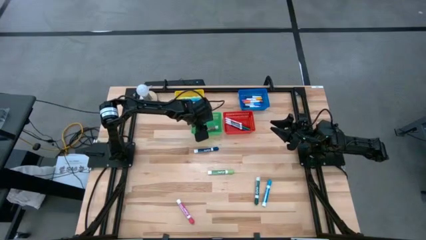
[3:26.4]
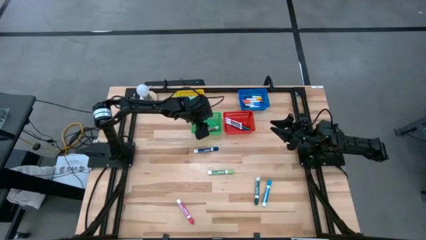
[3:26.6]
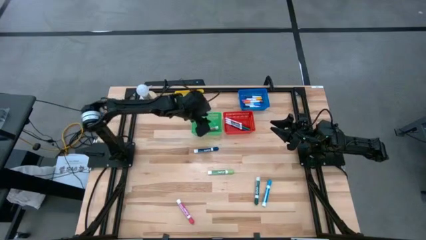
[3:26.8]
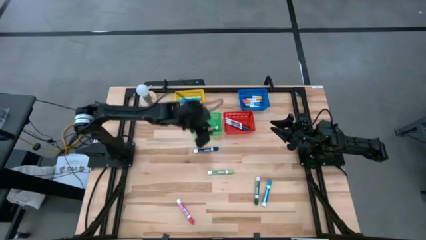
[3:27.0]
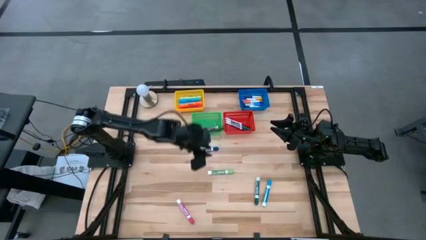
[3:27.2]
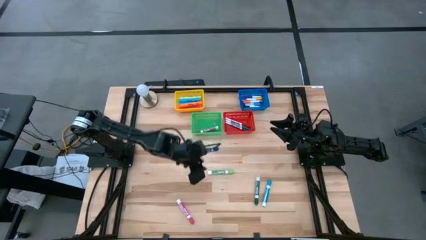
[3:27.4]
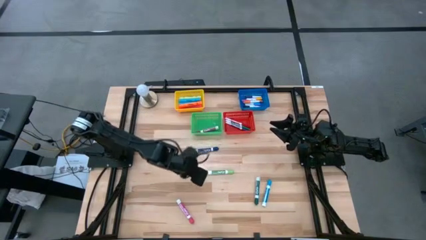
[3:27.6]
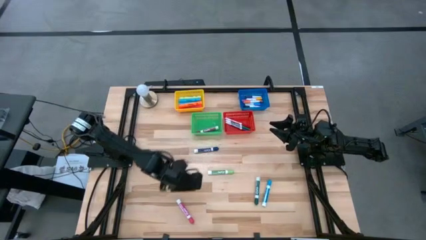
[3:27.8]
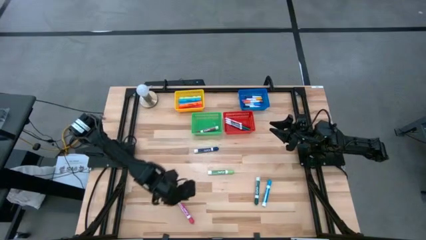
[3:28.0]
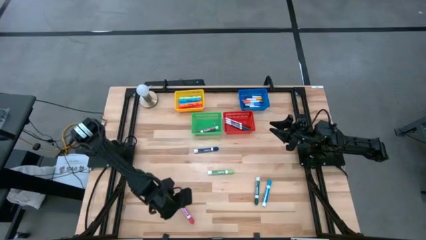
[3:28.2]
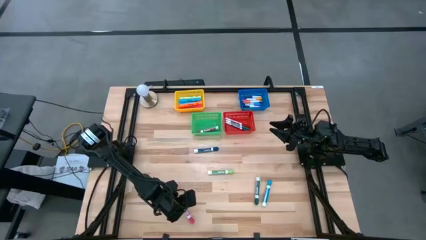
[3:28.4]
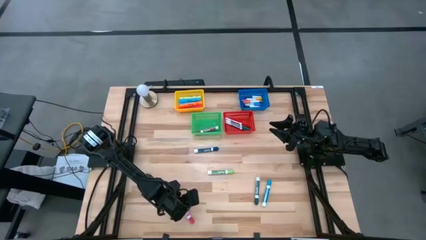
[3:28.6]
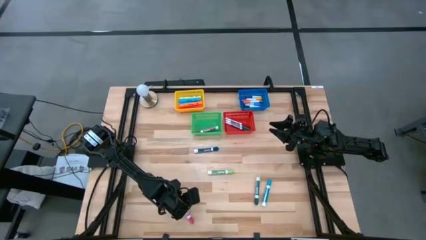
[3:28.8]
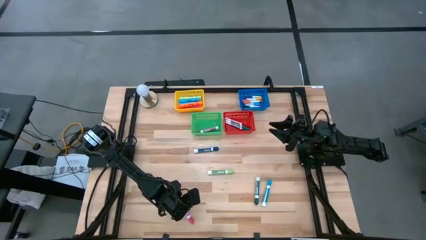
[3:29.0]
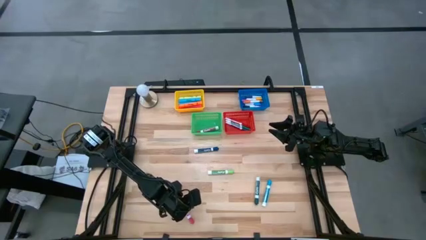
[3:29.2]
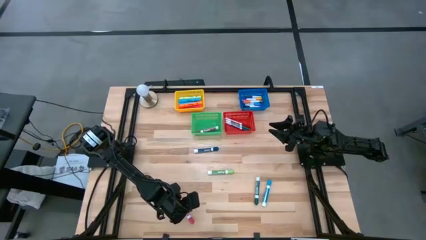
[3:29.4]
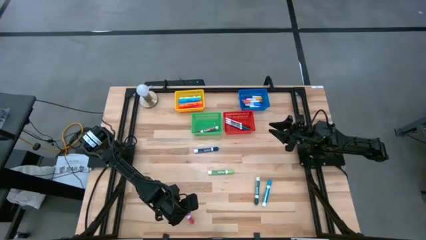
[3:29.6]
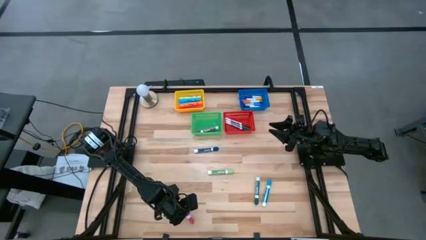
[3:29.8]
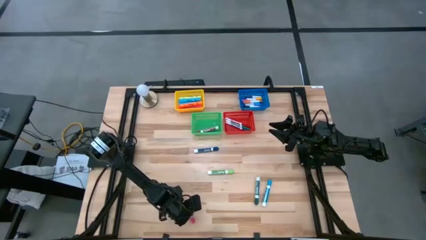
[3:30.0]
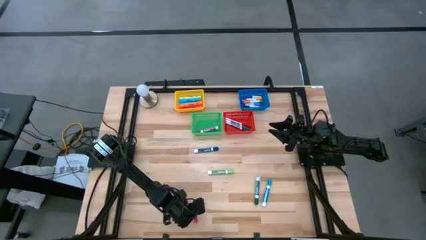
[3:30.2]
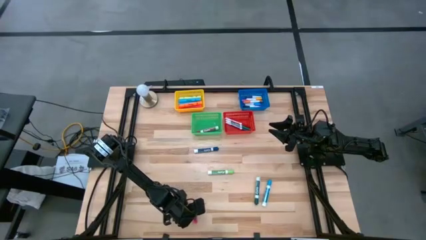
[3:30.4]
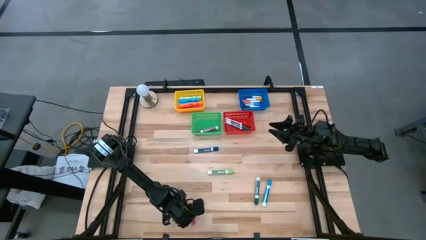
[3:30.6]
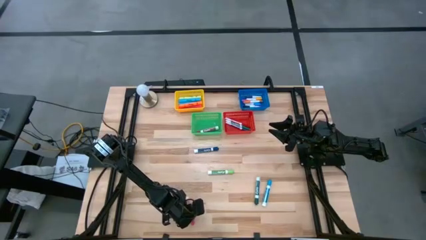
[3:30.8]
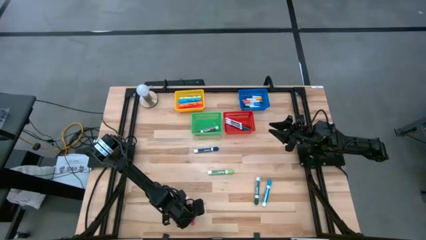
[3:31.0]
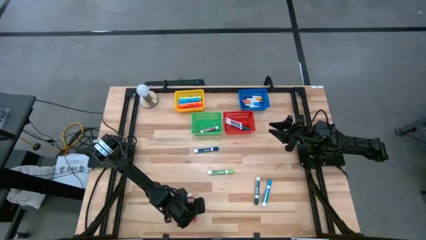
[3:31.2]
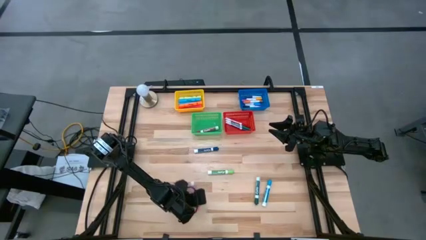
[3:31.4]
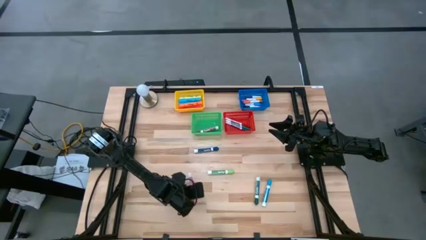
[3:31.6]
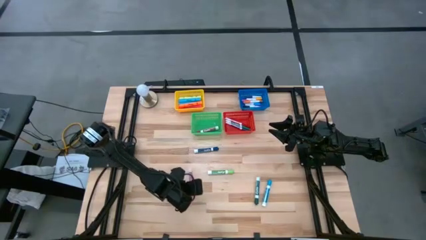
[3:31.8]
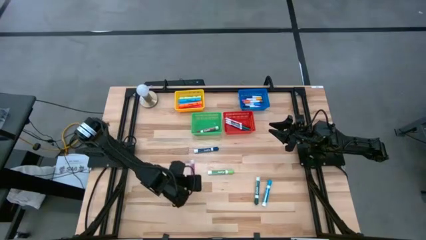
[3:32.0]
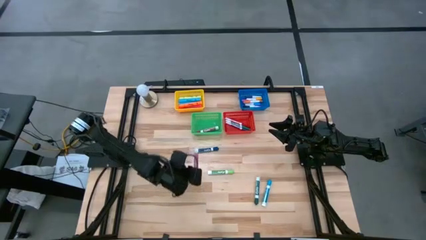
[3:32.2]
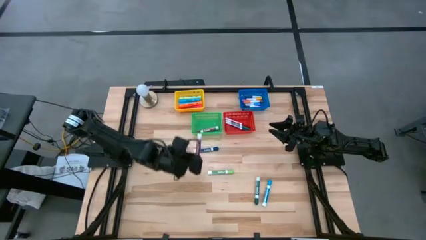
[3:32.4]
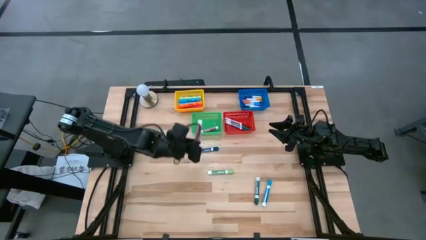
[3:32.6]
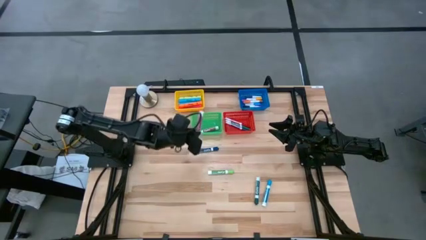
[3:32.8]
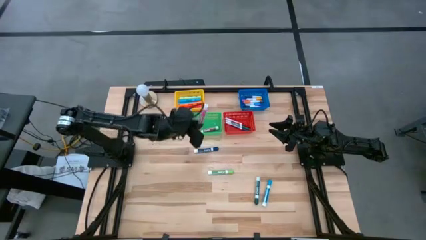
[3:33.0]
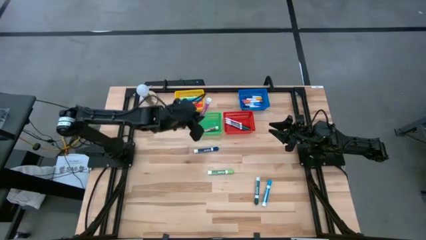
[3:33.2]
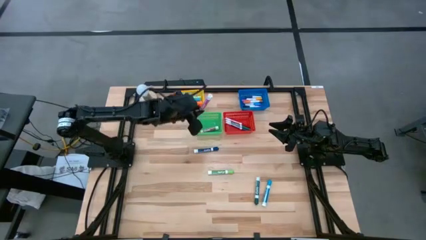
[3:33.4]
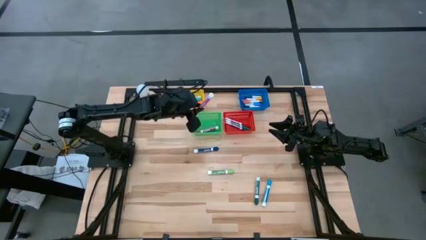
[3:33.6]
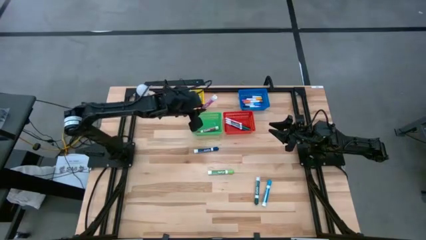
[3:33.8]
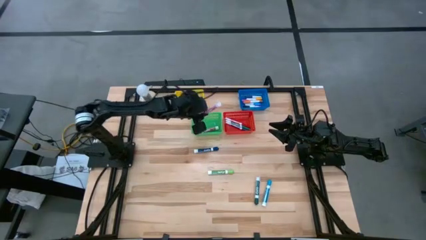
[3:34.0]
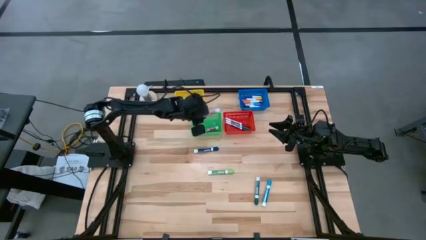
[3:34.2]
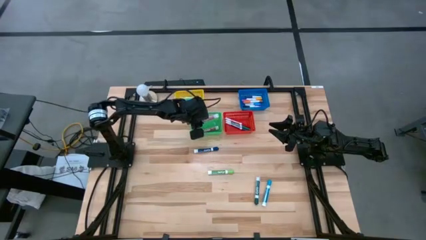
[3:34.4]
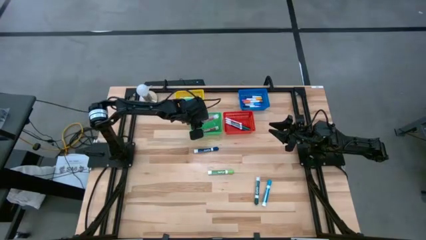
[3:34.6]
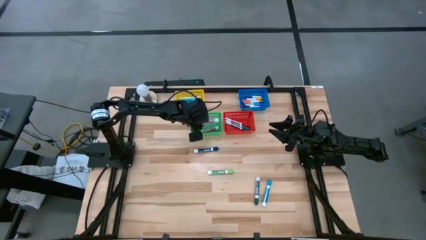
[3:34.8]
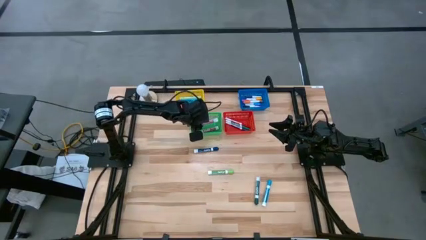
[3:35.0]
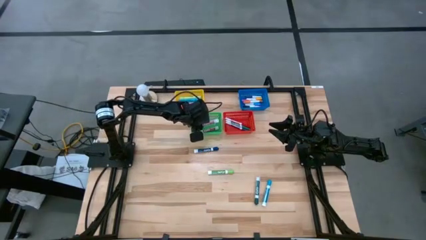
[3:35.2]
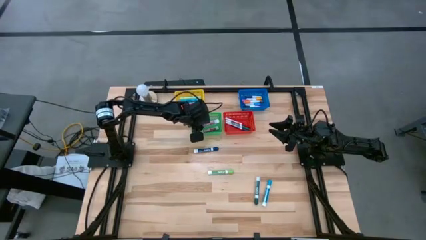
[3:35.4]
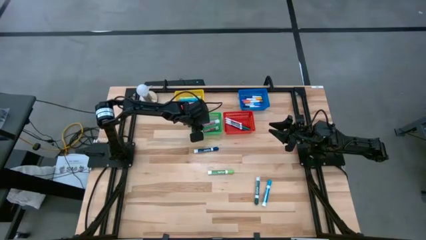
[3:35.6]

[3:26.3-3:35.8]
Task: Pick & Place Markers
Put the pink marker into the green bin

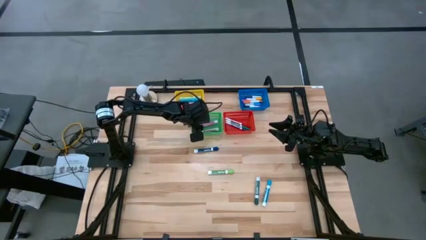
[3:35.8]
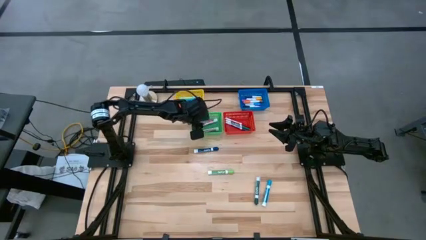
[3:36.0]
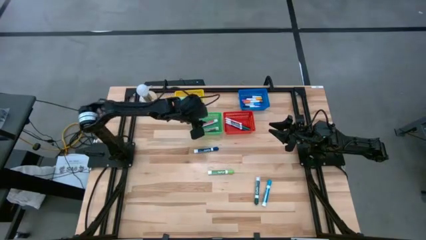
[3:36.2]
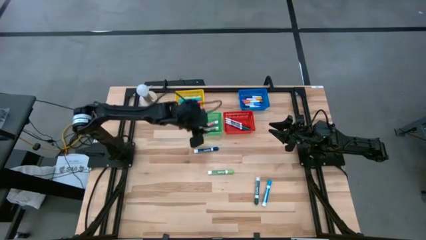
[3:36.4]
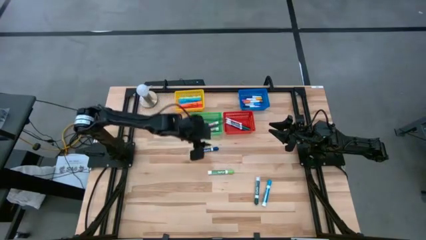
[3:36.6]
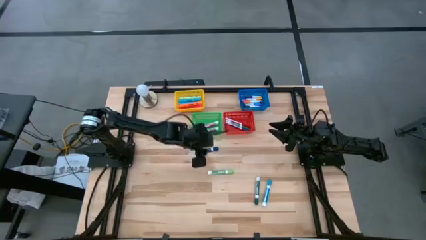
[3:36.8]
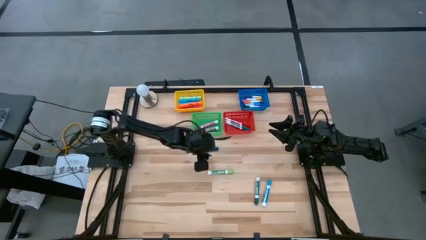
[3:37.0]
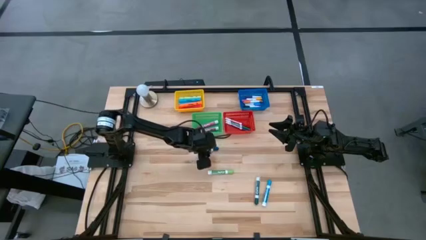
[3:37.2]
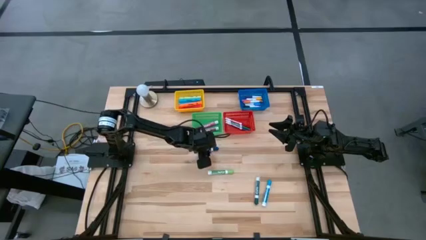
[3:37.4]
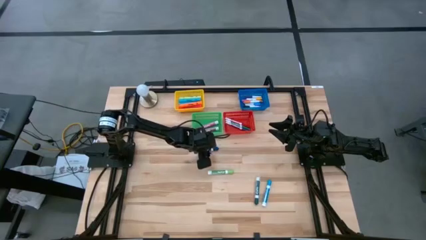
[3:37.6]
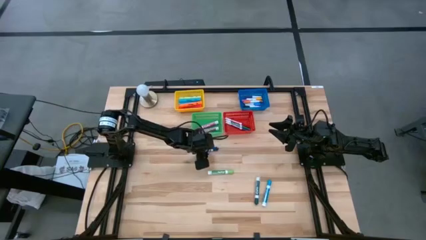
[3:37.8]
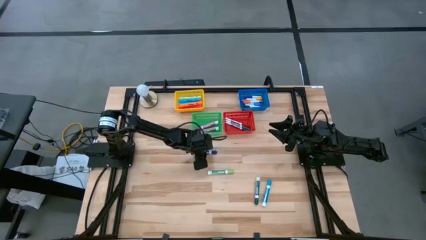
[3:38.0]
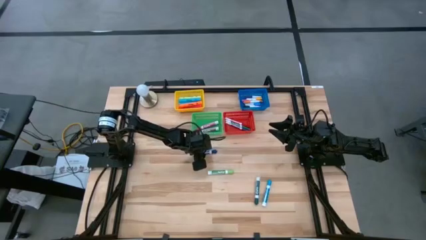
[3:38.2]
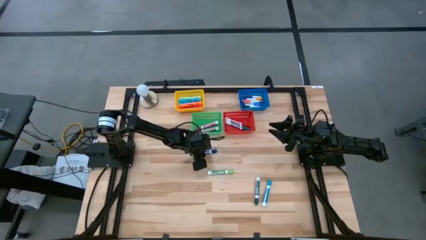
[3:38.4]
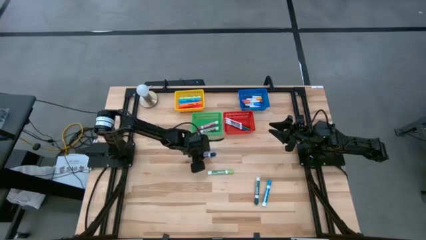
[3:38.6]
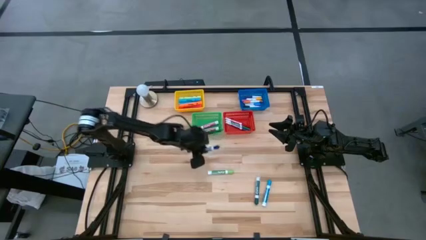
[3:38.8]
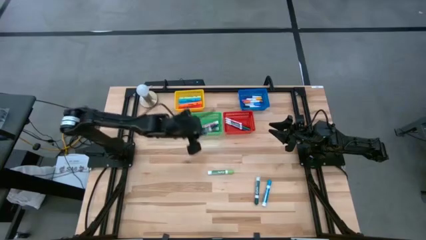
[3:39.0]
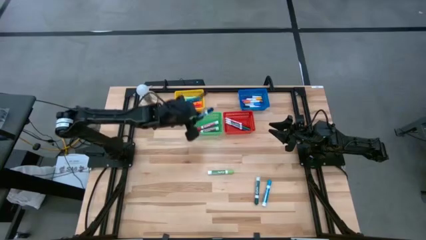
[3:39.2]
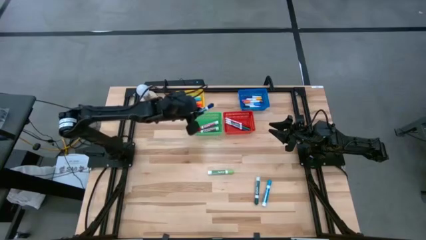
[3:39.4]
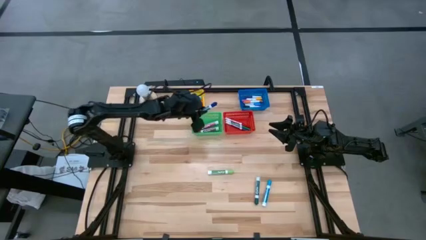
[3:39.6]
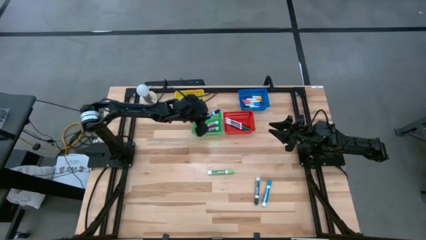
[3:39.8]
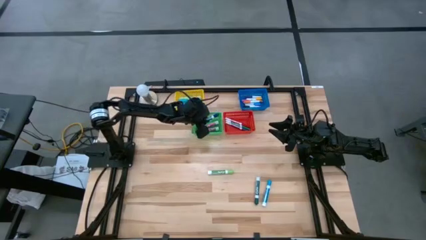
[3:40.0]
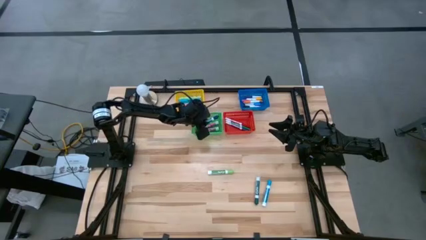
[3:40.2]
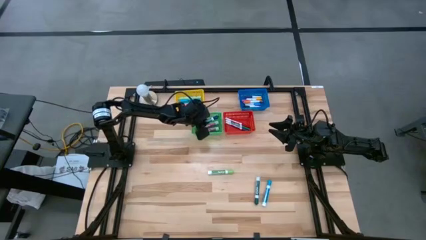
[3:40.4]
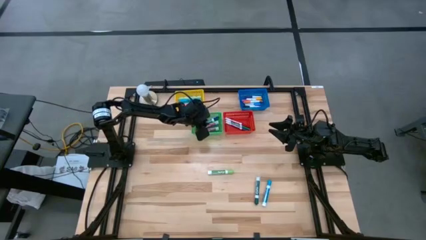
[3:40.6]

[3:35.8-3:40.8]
Put the dark blue marker into the green bin

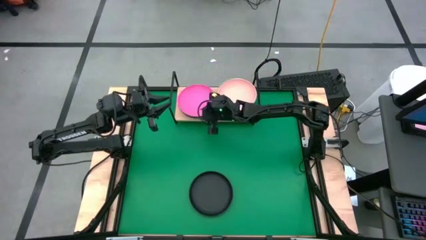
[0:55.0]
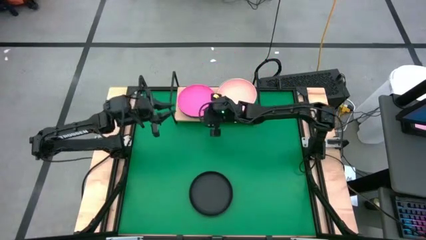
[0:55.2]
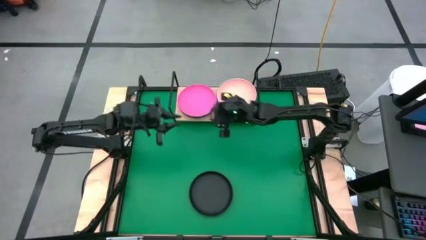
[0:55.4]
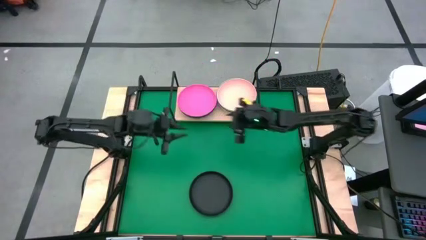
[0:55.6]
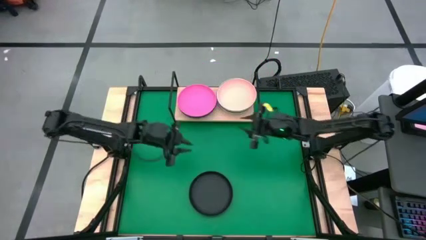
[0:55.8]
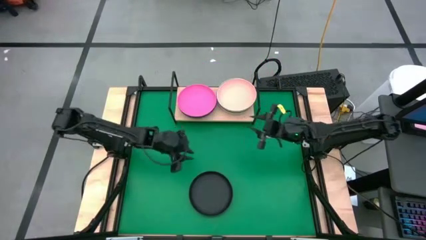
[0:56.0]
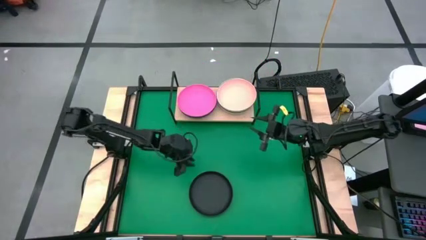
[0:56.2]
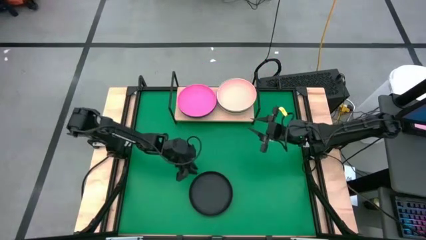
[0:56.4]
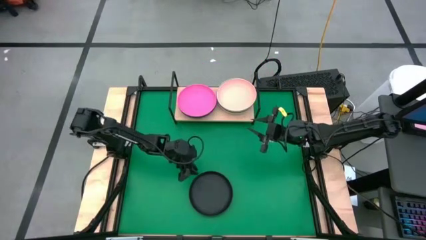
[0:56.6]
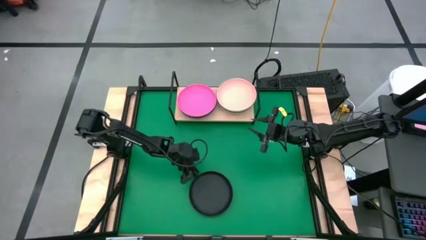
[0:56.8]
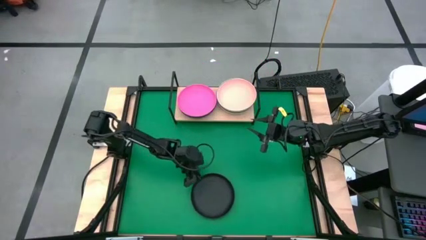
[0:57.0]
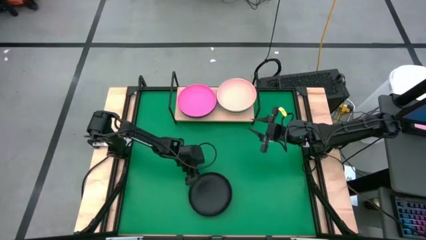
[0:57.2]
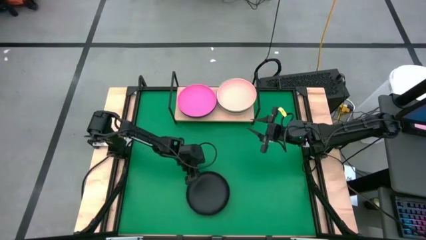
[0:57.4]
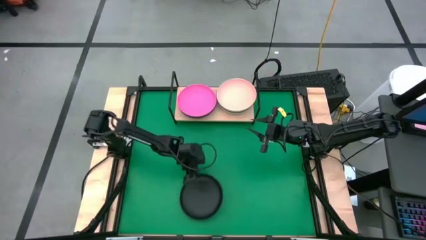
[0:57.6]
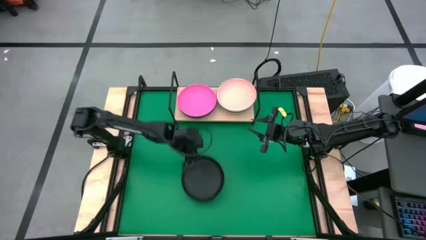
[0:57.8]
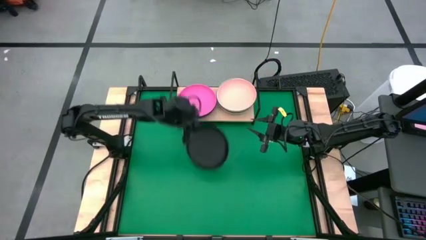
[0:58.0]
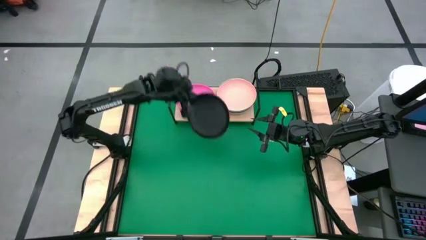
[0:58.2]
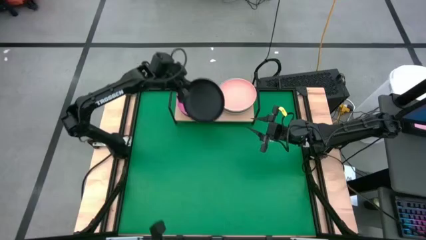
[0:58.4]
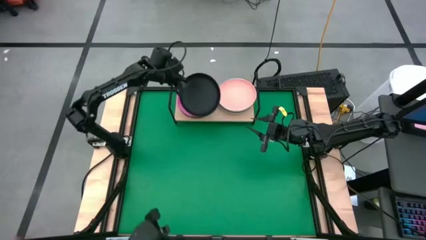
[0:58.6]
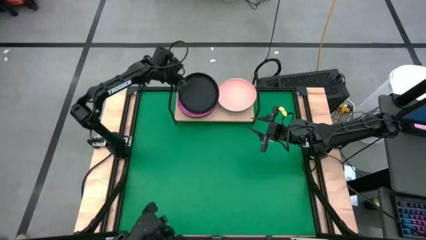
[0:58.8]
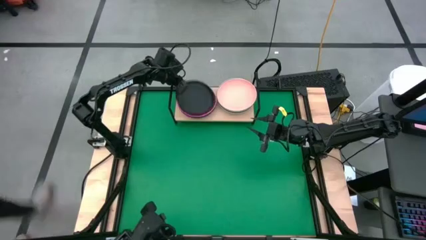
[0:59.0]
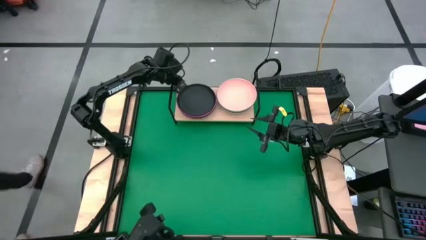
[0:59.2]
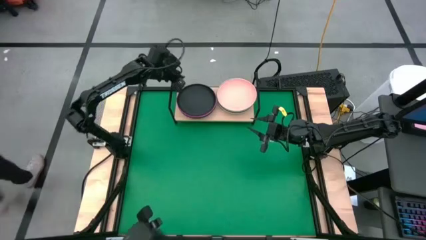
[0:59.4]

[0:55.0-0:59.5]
Task: Place and stack plates onto a shelf
Stack the black plate on top of the pink plate
